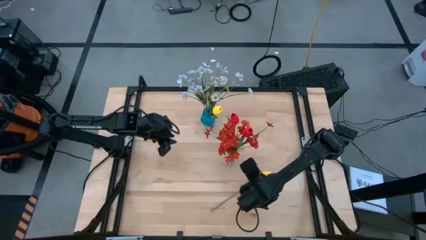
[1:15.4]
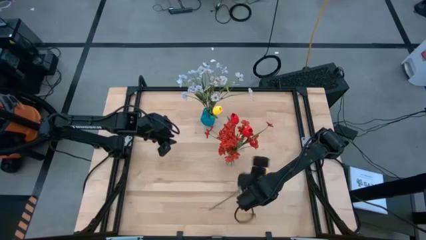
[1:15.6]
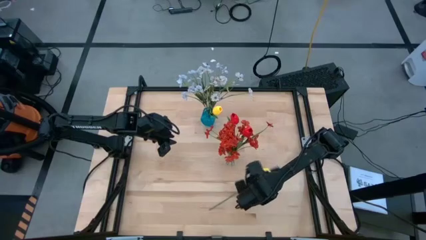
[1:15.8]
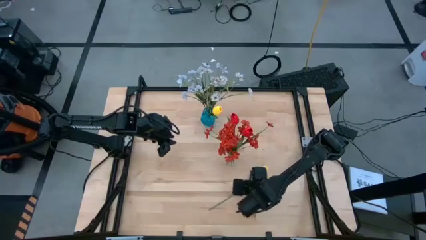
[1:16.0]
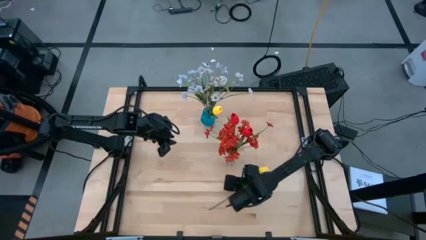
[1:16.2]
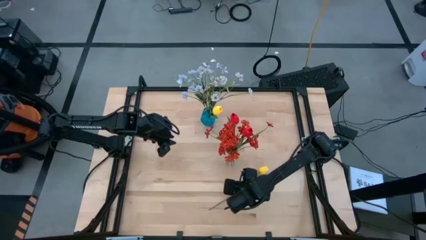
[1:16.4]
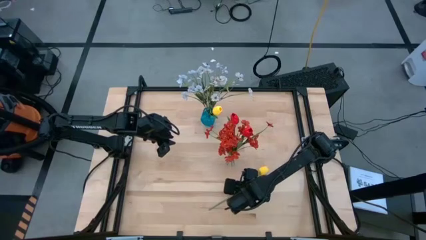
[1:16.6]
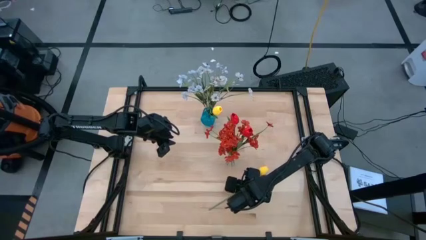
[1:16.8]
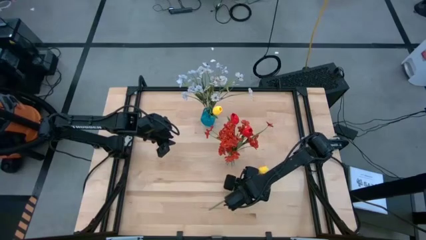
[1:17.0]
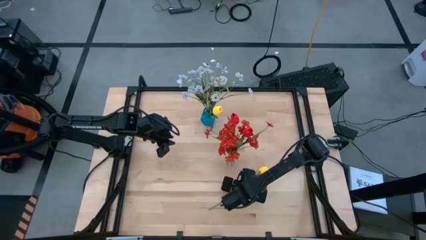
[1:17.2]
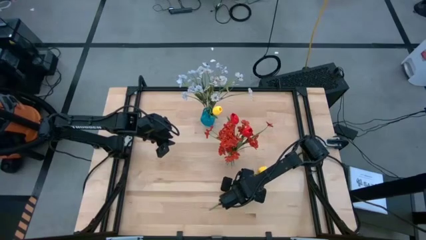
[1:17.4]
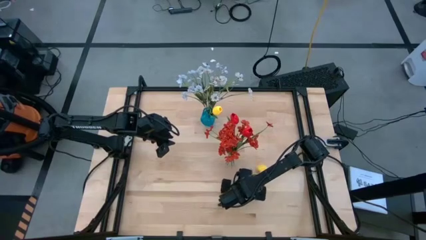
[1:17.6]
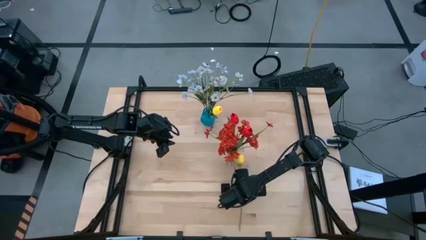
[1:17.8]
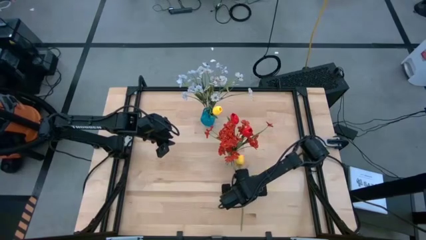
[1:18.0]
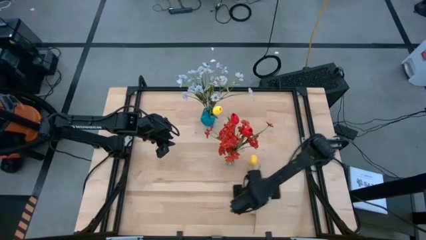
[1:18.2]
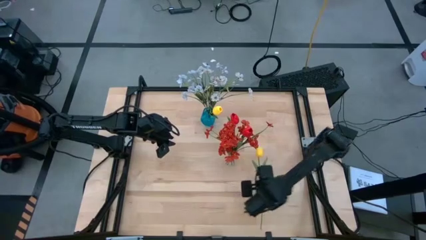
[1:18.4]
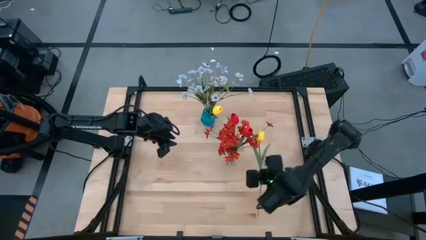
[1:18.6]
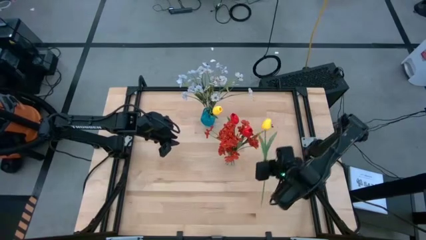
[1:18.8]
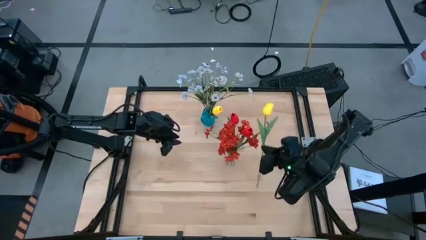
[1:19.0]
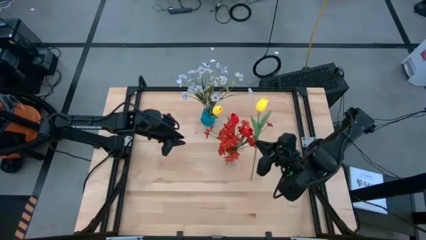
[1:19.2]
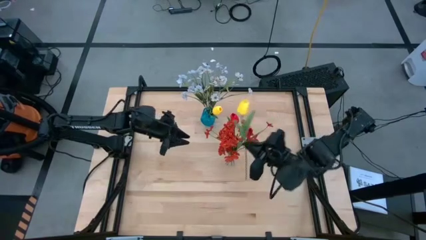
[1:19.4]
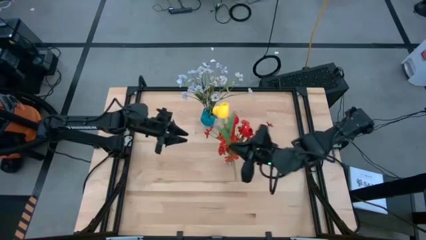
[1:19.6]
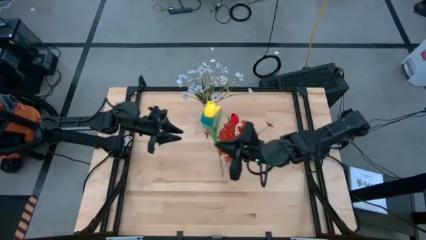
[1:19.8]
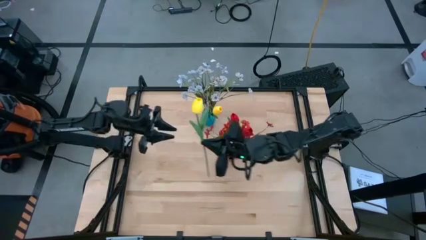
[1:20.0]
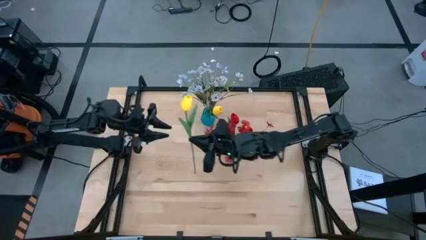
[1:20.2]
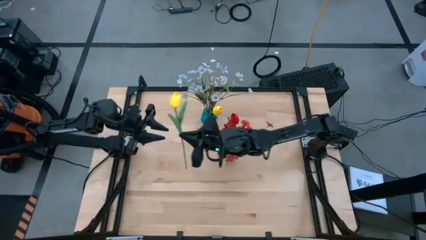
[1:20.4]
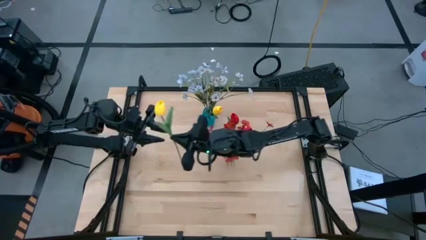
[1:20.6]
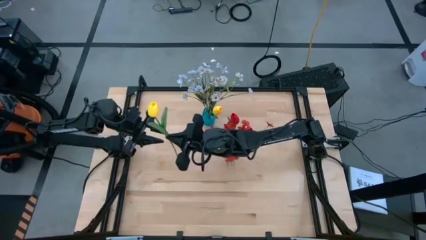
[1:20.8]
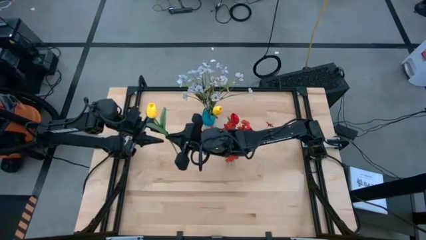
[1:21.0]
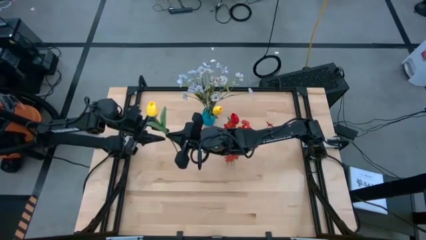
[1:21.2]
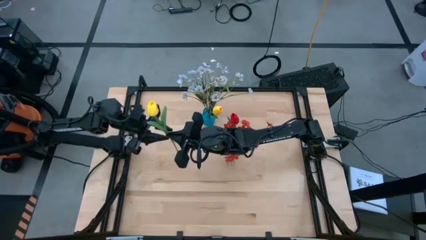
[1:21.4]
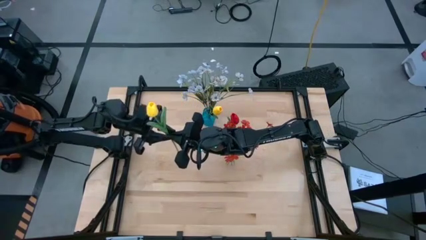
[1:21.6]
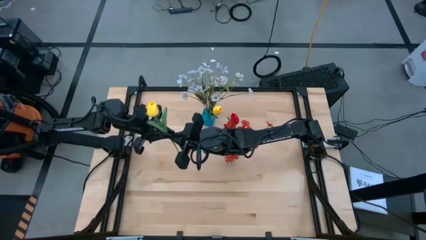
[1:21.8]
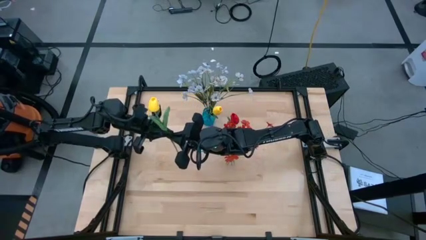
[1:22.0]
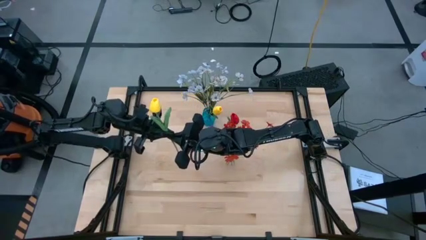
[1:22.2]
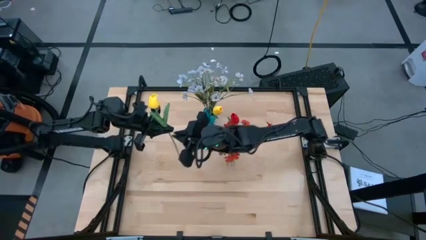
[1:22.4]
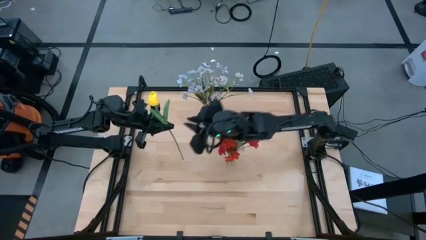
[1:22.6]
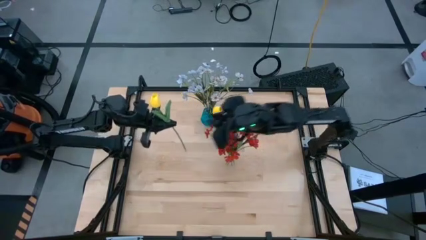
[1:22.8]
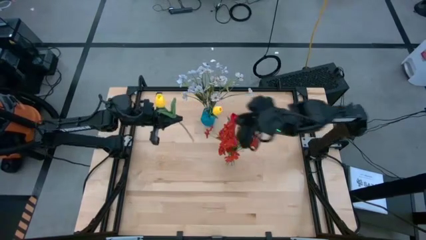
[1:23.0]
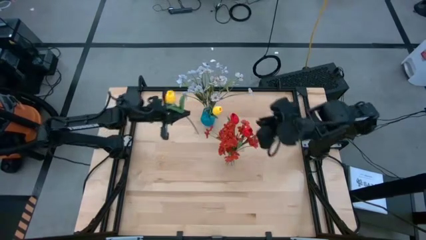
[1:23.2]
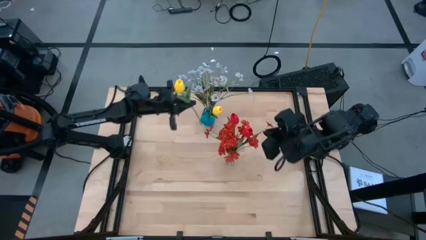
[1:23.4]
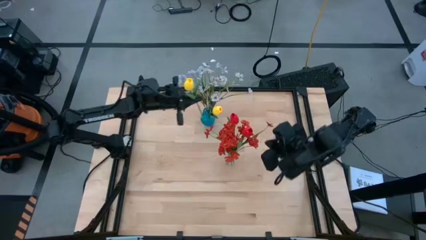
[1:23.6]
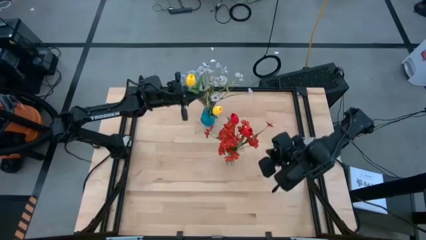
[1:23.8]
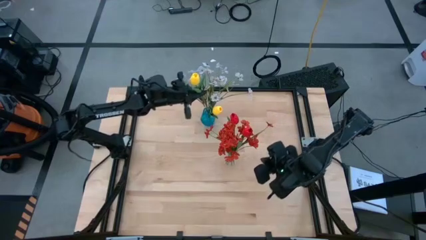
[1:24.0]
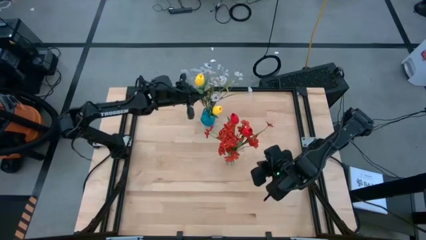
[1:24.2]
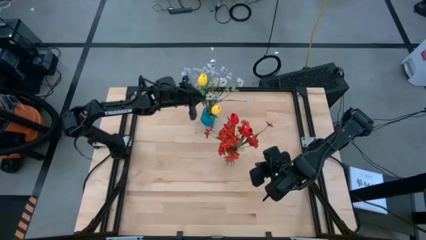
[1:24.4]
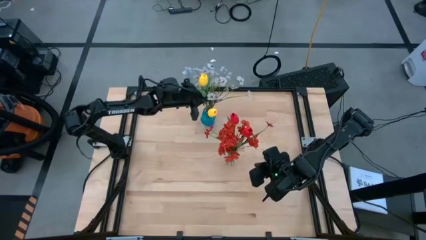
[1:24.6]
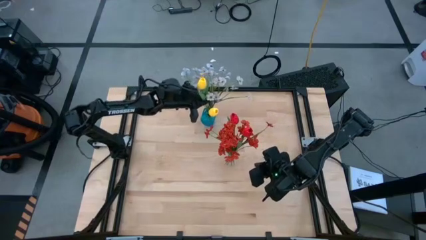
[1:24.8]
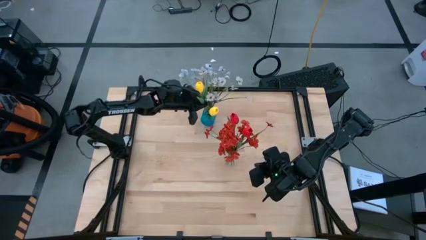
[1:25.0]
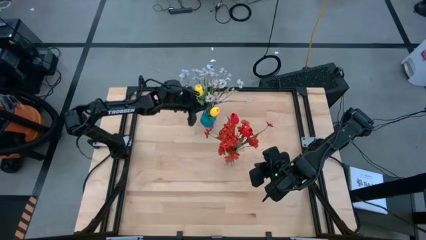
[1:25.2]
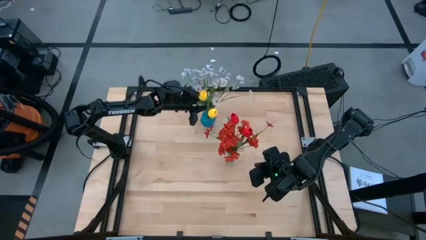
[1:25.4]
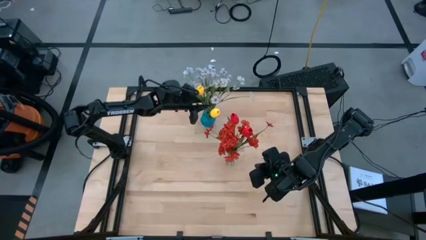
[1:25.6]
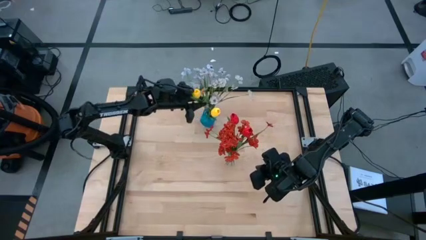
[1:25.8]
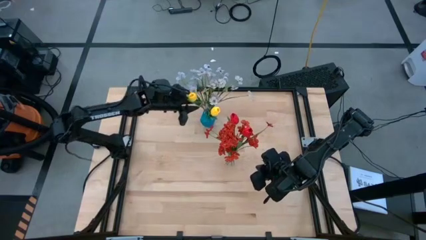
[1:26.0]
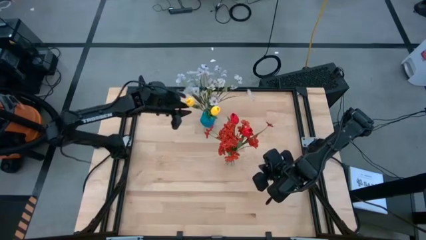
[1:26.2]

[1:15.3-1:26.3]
Task: Sort flowers into vase by color
Put the yellow tulip into the blue vase

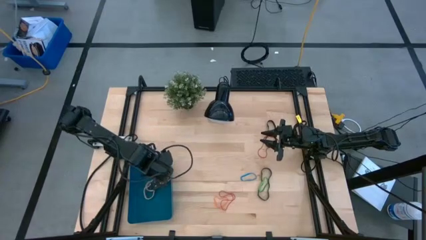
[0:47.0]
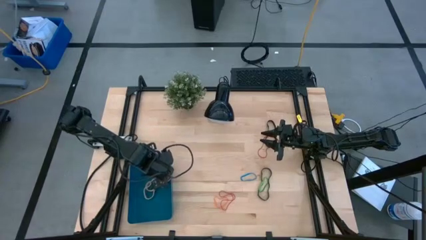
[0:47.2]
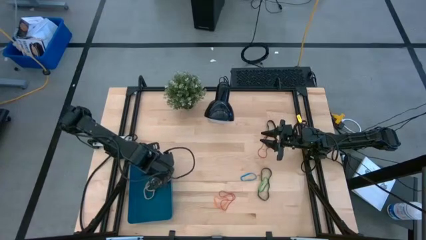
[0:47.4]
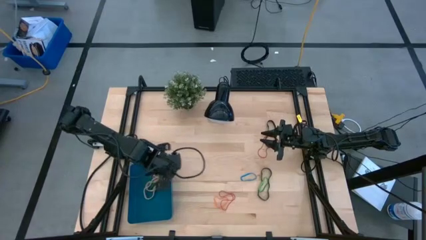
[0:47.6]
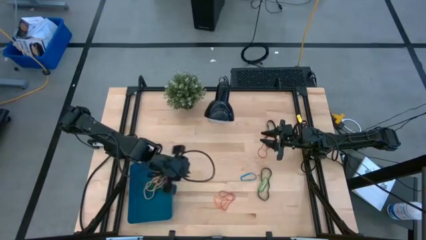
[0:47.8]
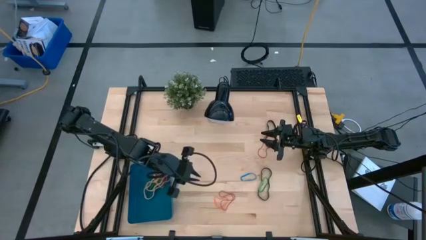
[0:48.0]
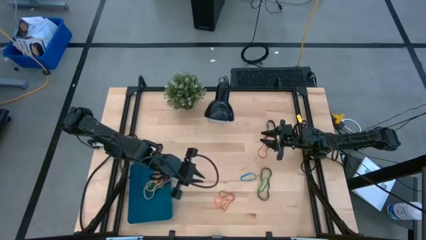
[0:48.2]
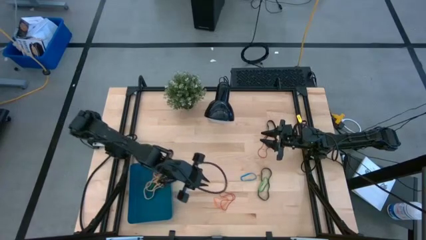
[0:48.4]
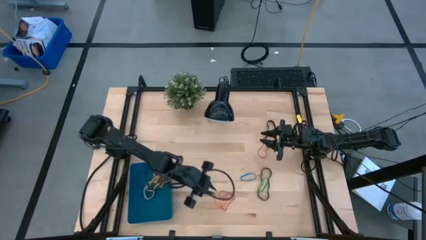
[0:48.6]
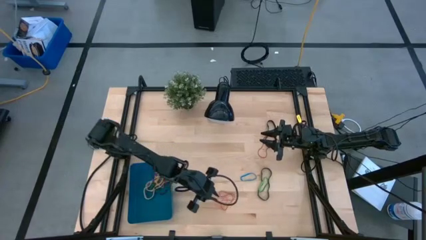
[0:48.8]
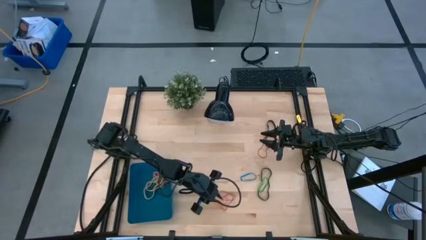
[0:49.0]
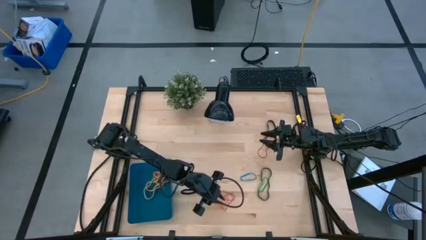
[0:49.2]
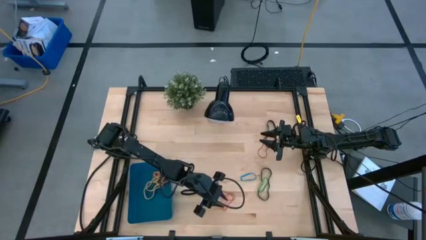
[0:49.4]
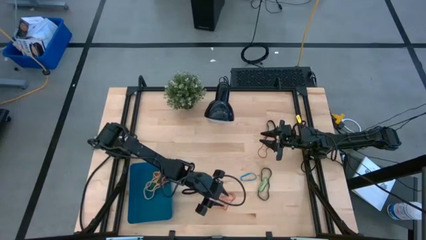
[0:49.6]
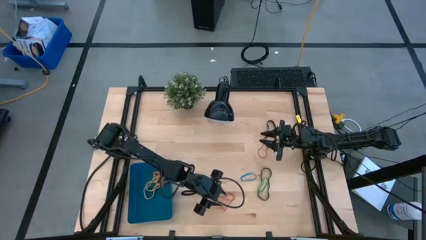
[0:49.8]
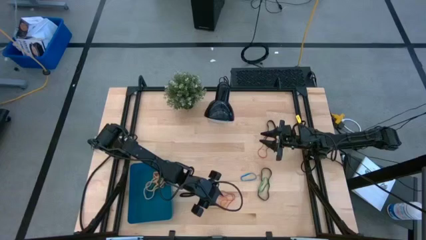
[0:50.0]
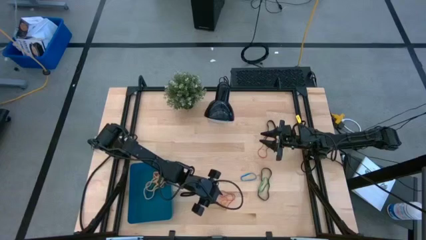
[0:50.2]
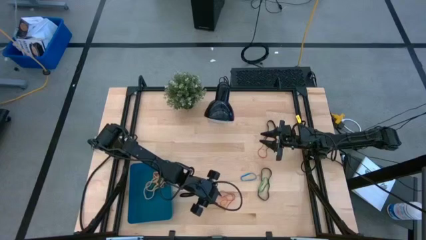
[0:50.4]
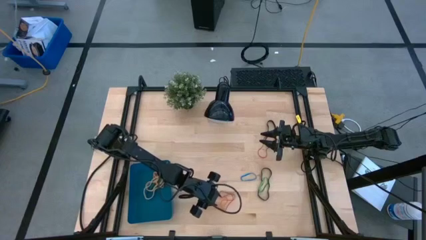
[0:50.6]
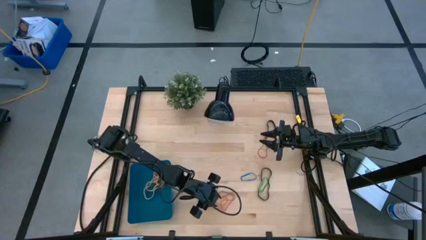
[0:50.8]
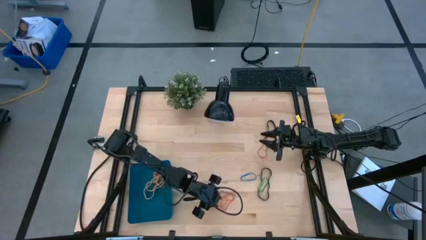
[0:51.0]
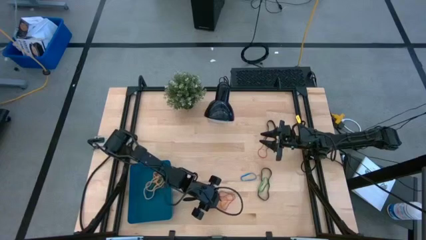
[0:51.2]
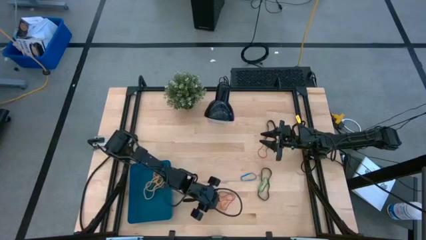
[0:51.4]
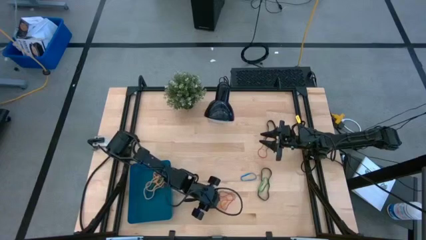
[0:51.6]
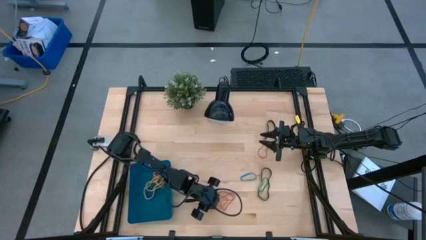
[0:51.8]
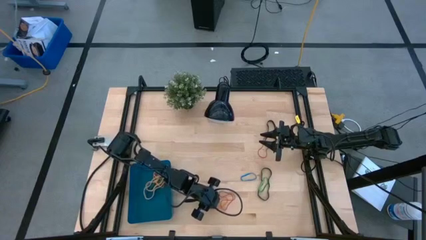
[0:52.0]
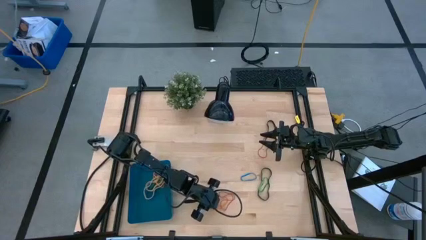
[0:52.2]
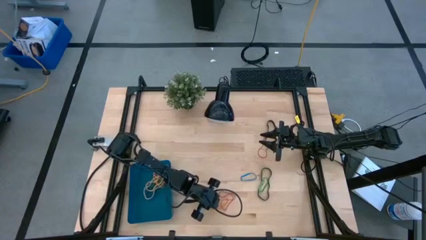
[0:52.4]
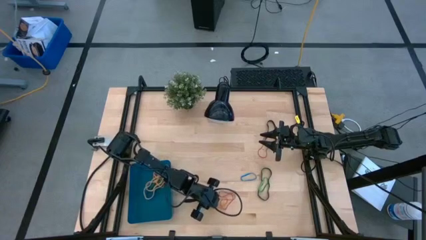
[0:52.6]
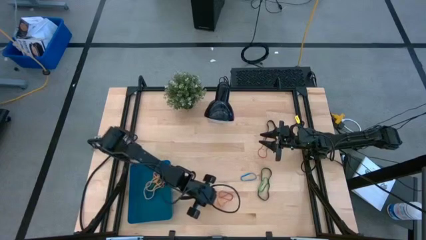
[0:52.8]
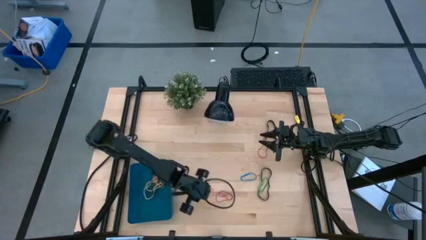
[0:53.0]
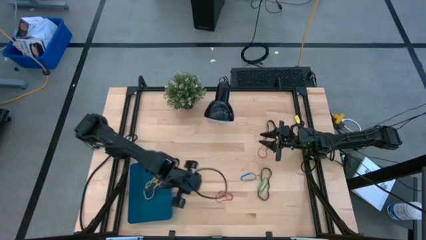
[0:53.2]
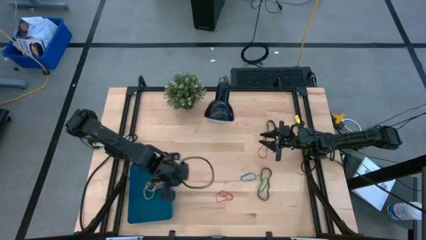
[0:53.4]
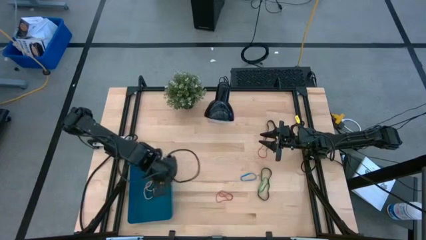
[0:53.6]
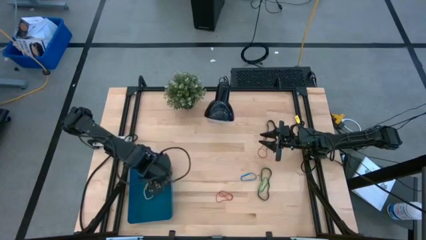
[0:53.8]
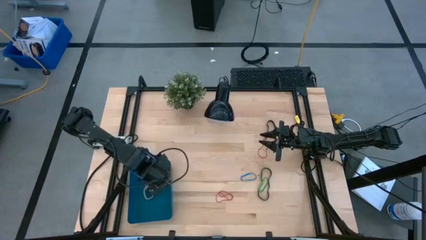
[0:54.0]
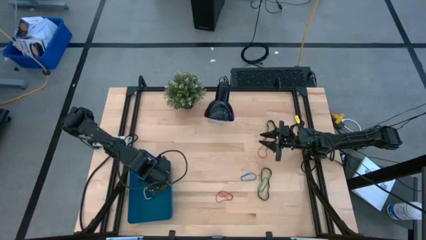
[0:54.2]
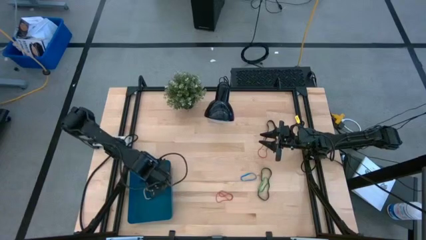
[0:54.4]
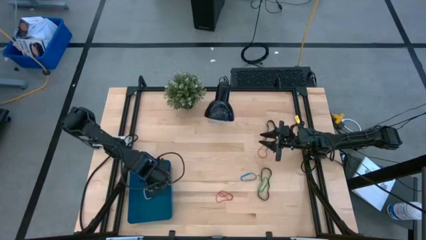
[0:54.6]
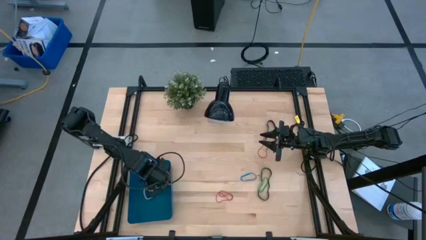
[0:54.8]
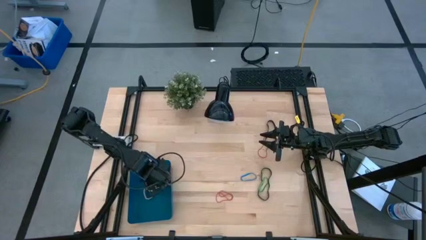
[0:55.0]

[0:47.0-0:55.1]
Task: Pick and place rubber bands into bin
Put the orange rubber band into the blue bin
